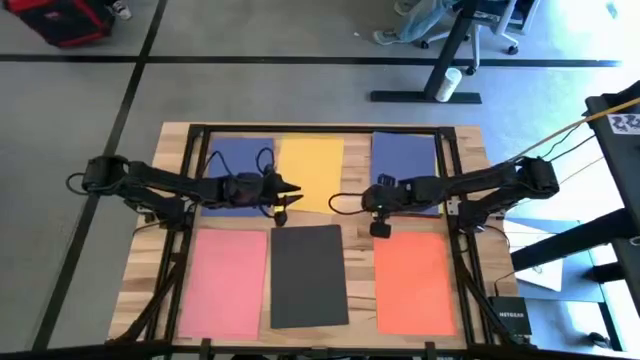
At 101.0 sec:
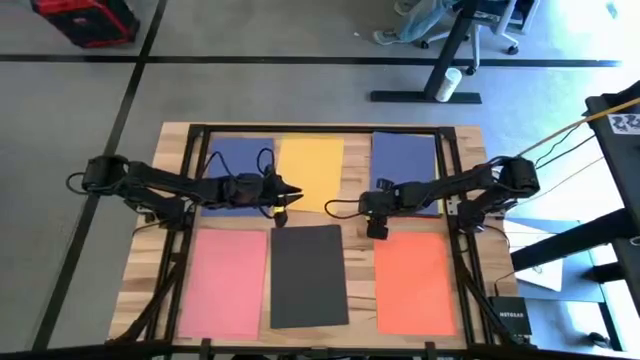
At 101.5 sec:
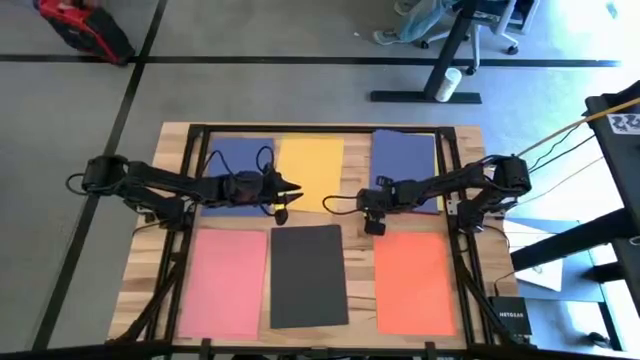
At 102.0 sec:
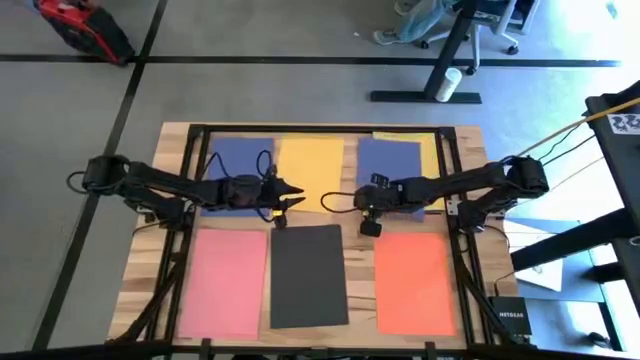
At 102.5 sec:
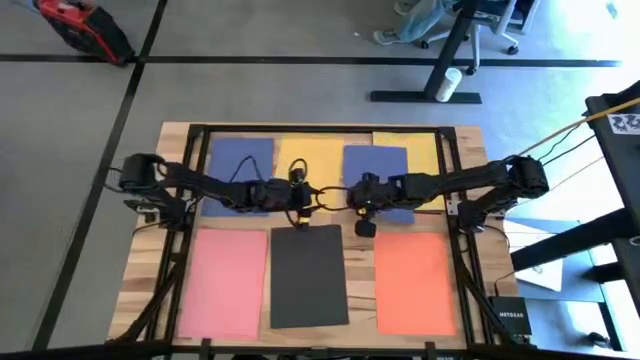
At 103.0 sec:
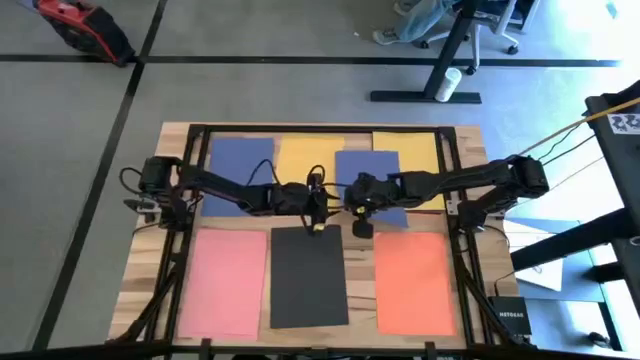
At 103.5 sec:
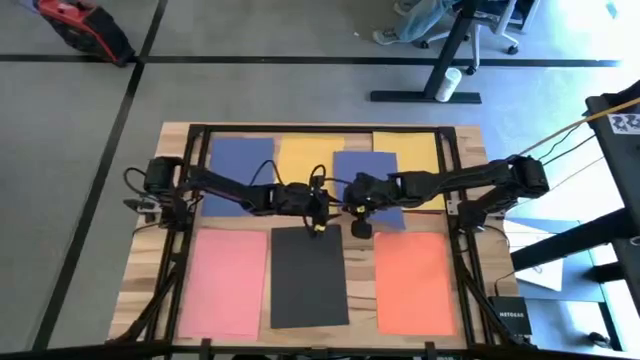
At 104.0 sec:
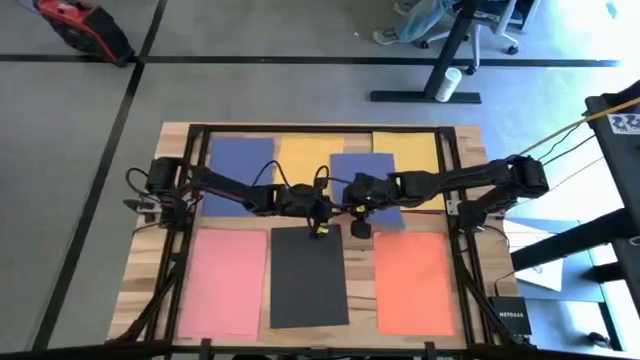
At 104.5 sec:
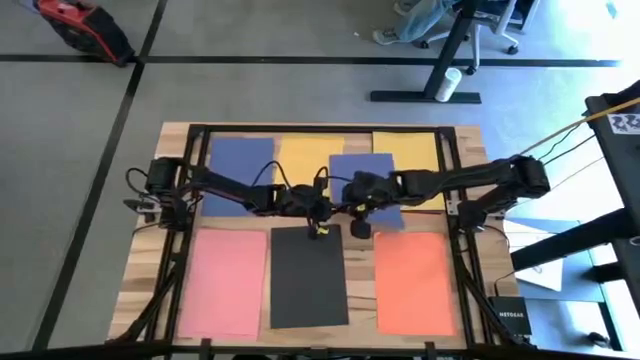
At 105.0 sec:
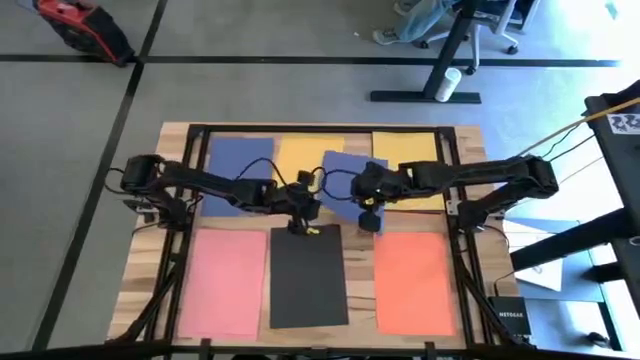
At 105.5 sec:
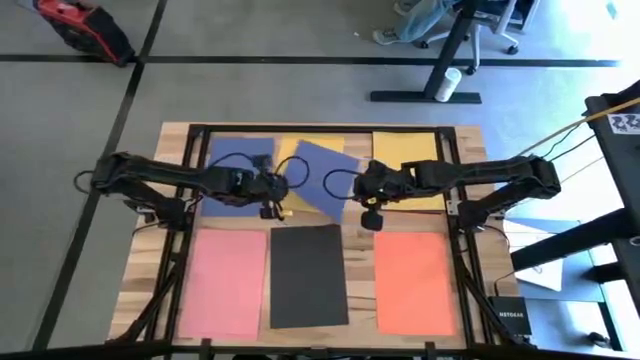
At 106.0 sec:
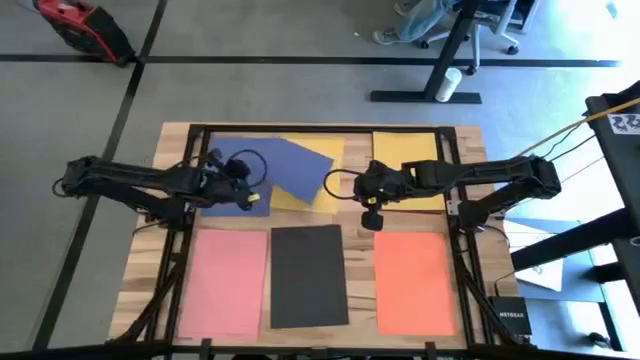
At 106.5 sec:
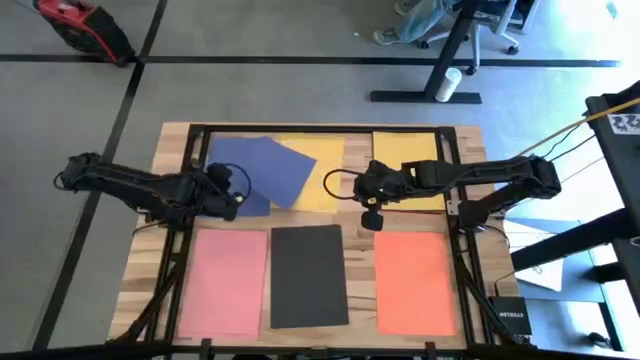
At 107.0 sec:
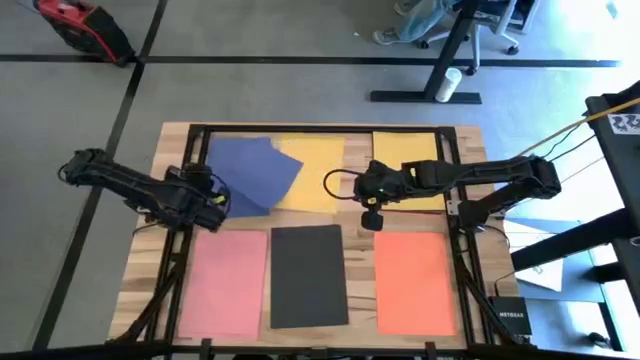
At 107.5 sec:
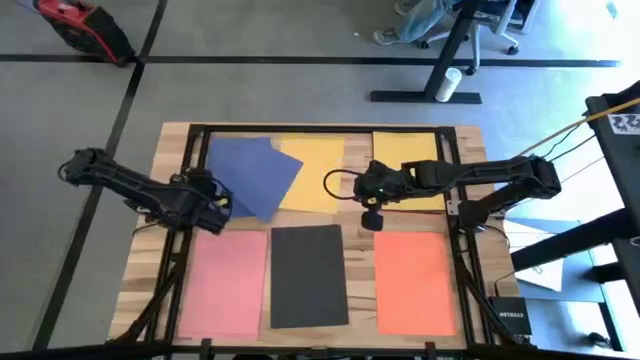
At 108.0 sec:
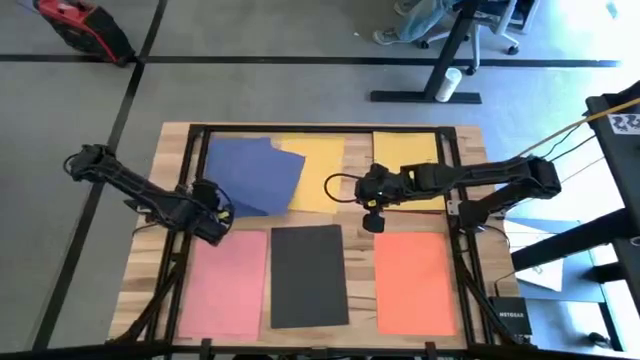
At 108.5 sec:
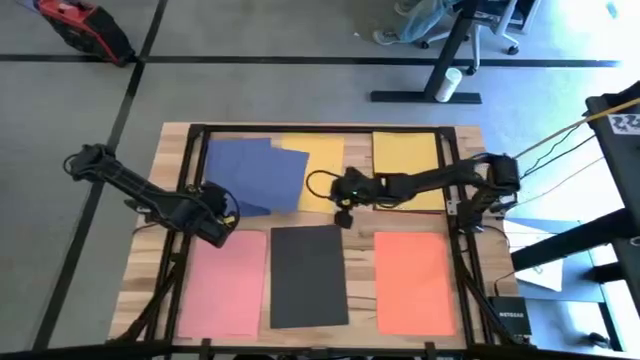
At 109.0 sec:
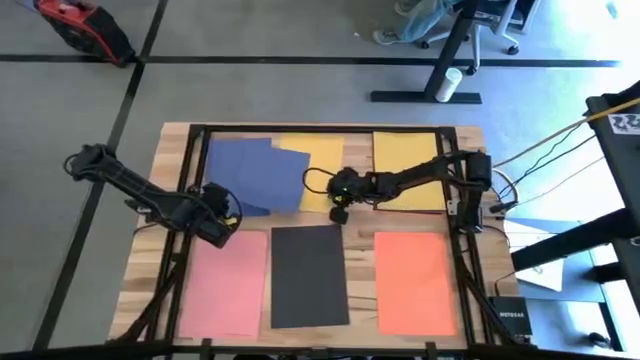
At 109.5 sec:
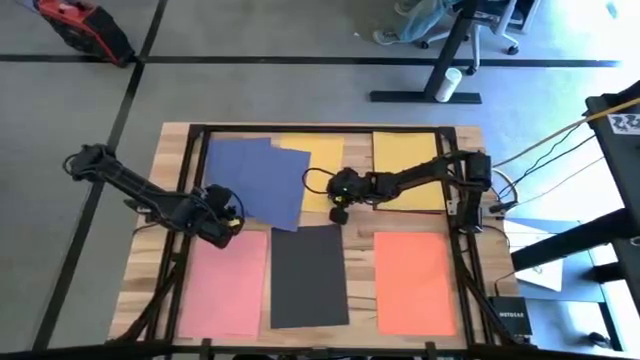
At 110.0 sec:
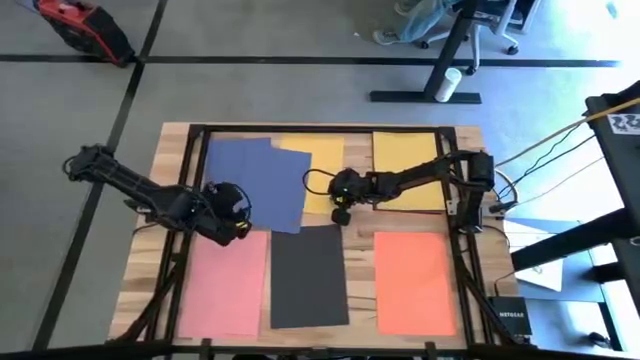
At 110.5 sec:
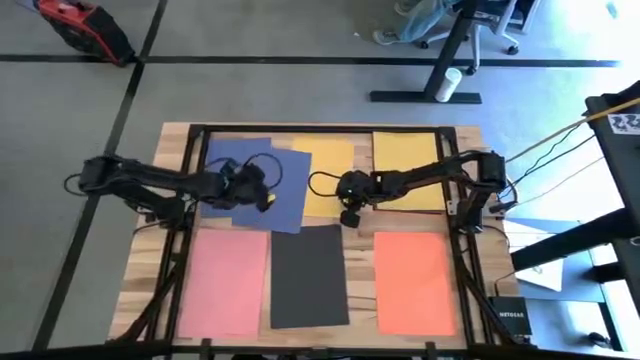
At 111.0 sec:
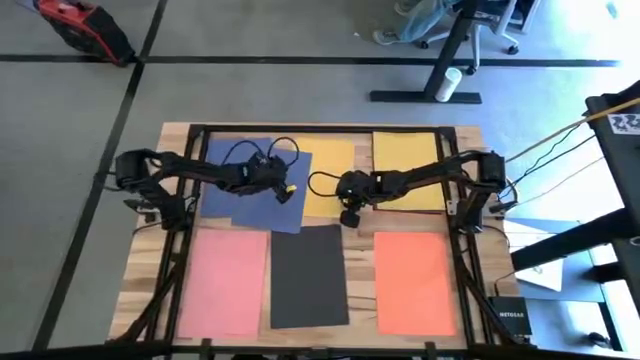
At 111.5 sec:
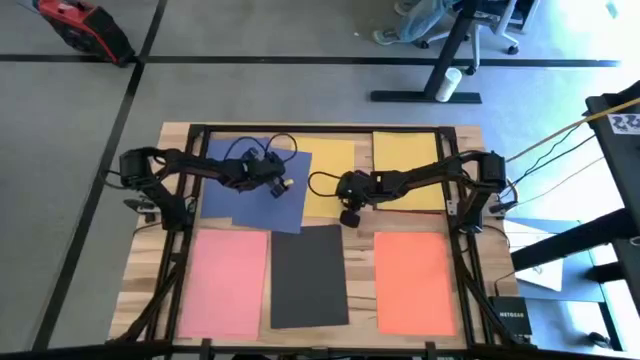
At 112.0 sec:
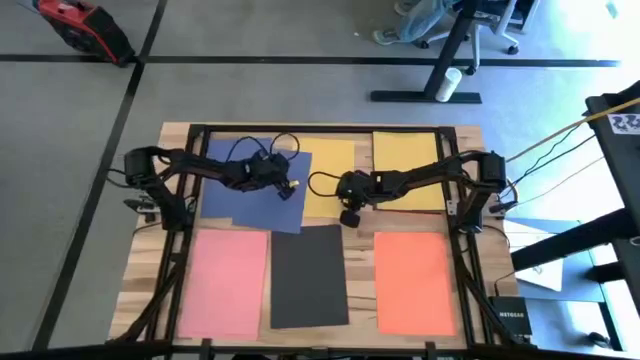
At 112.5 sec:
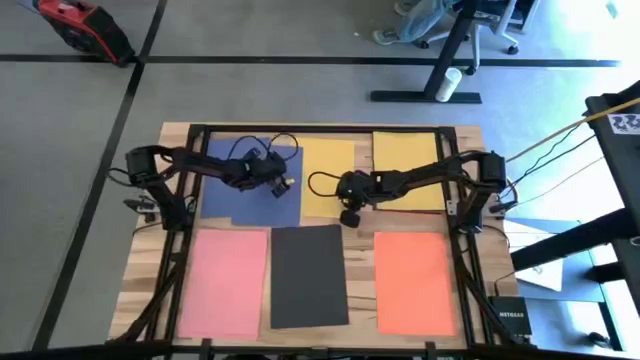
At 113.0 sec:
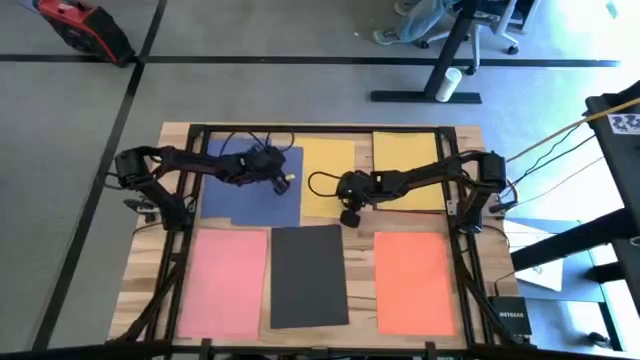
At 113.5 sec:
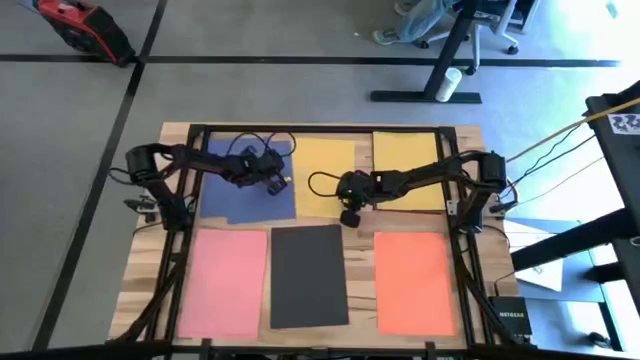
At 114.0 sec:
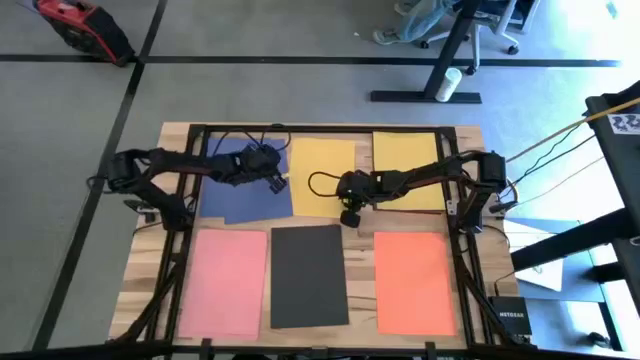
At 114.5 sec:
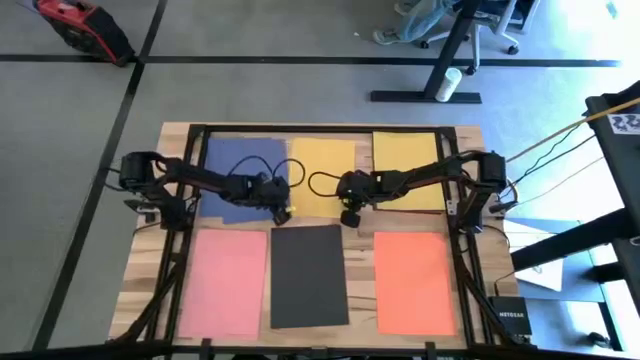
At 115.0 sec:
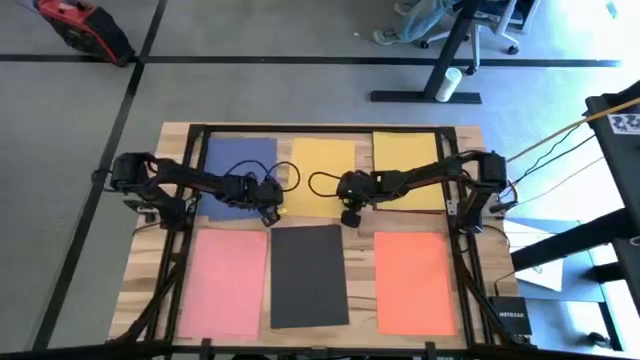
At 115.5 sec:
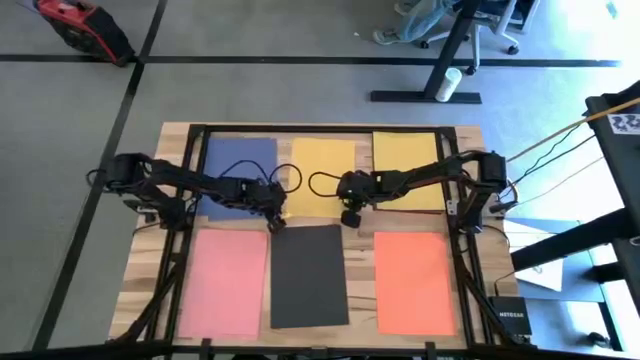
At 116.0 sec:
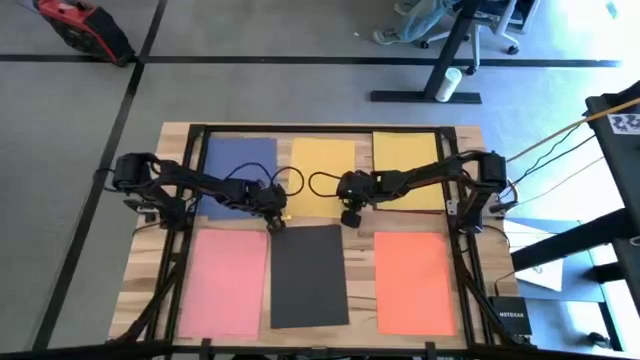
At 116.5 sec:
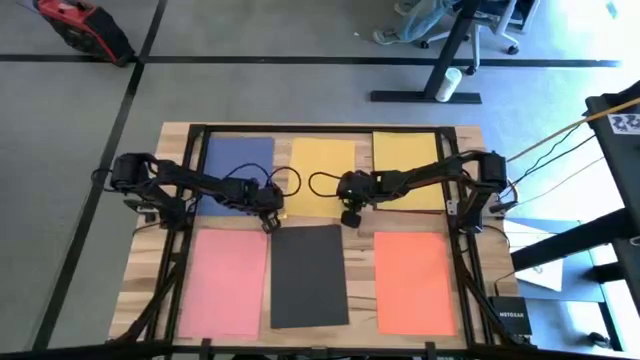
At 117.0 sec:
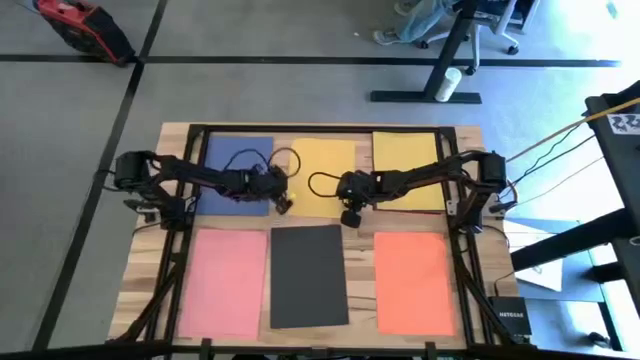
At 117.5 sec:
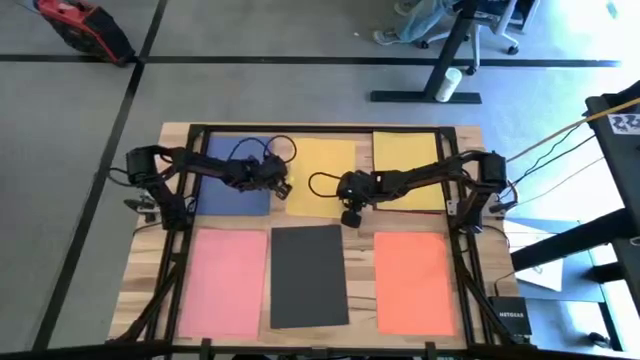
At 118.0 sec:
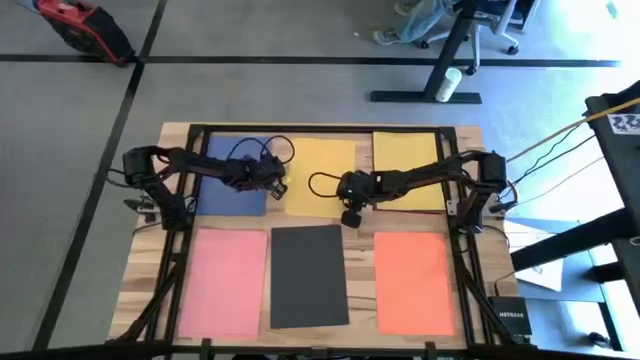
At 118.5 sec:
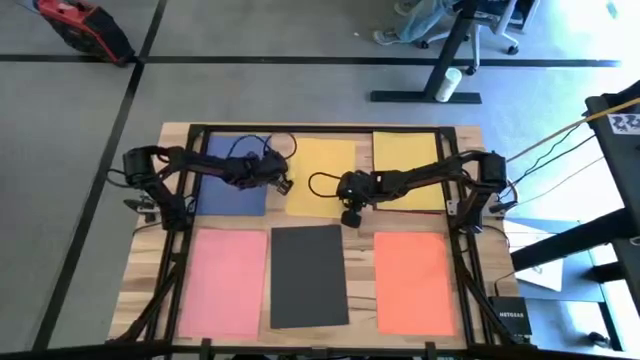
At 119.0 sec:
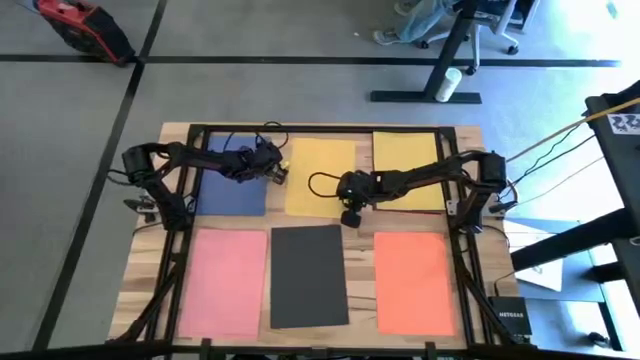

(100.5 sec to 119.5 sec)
Task: Organize paper
Stack the blue paper on top of the other blue paper

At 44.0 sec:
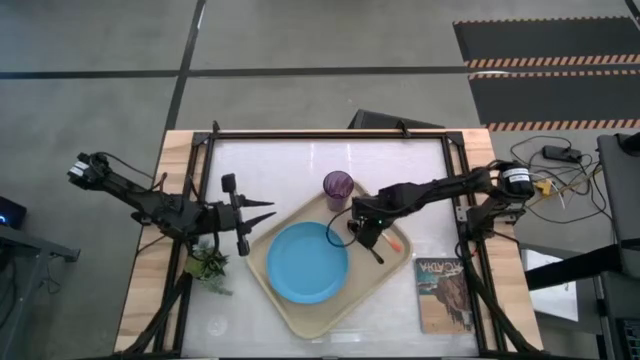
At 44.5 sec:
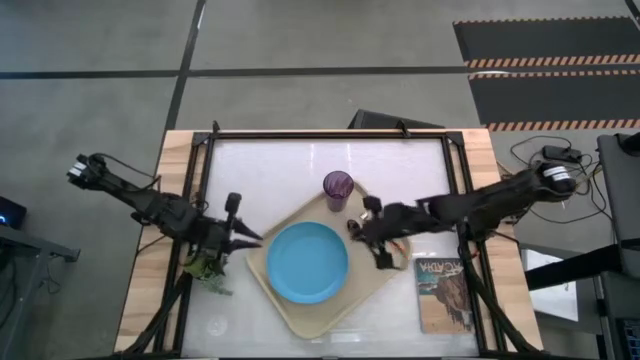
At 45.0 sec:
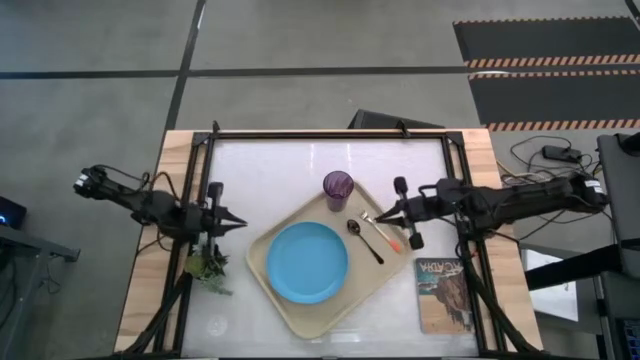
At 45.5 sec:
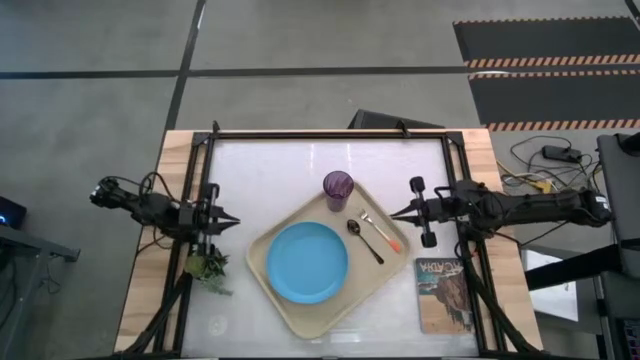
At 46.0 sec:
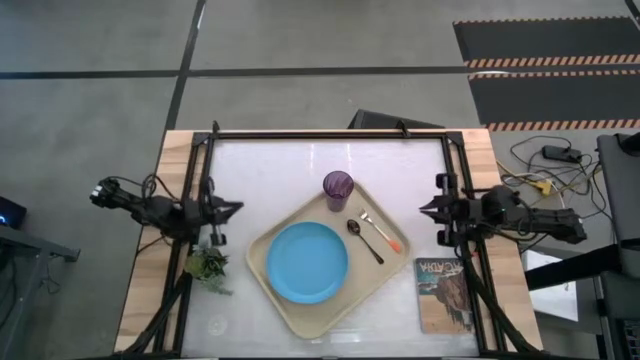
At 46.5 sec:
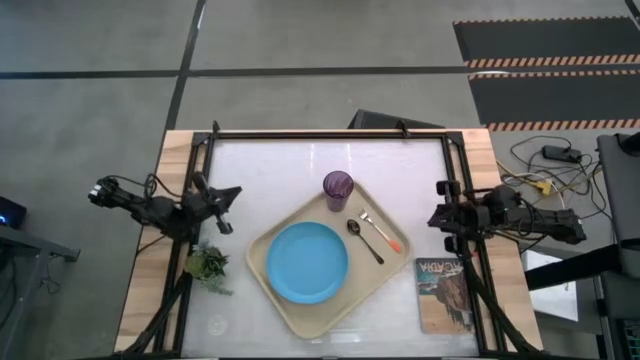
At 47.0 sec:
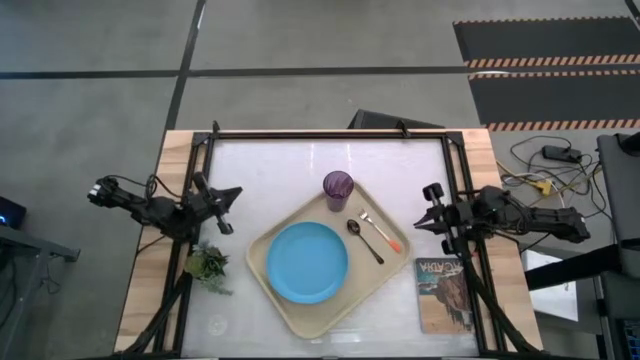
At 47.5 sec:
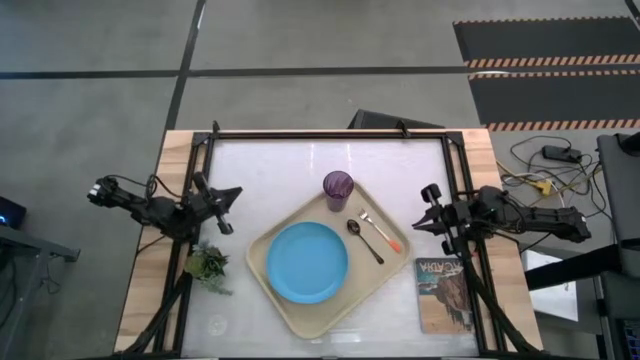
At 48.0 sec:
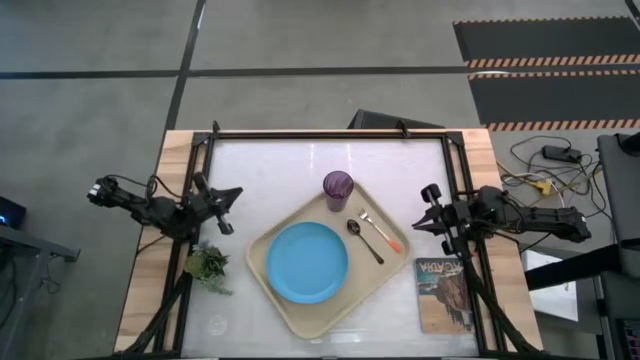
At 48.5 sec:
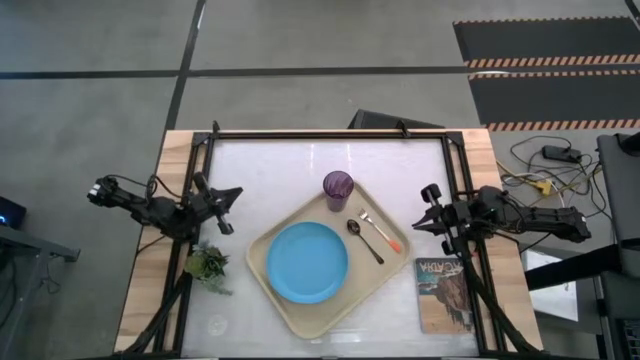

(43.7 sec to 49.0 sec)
Task: Pick and place plate/cup/fork/spoon on tray
Return to Home Position
